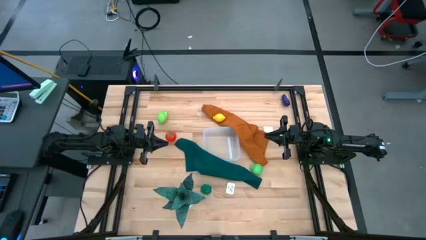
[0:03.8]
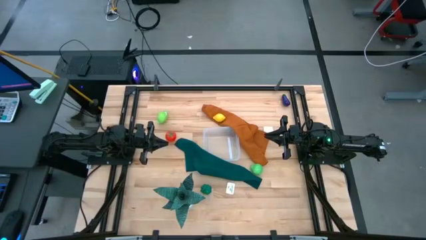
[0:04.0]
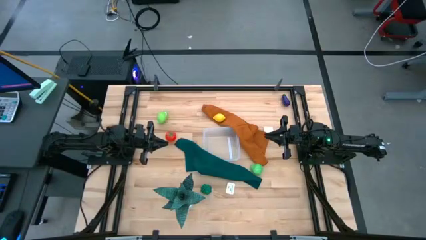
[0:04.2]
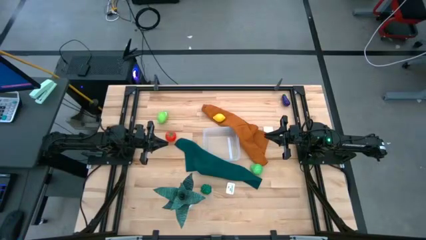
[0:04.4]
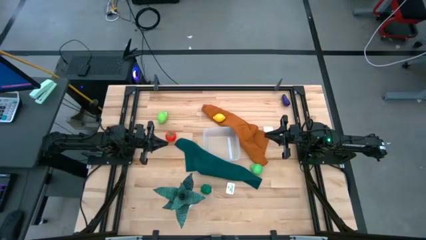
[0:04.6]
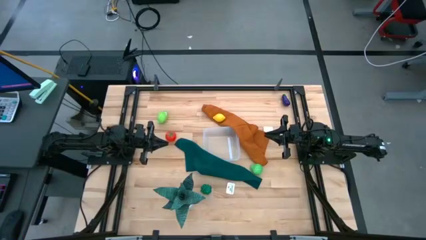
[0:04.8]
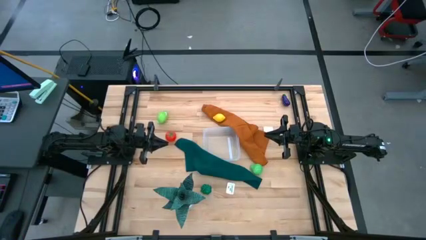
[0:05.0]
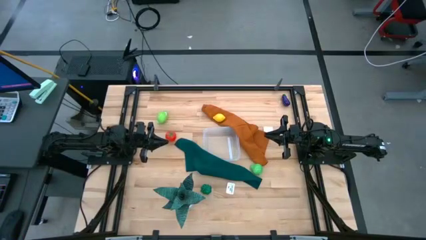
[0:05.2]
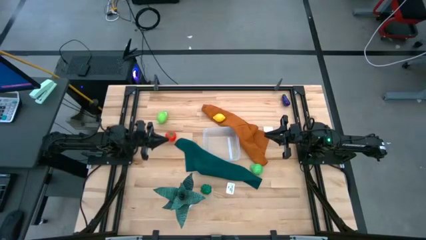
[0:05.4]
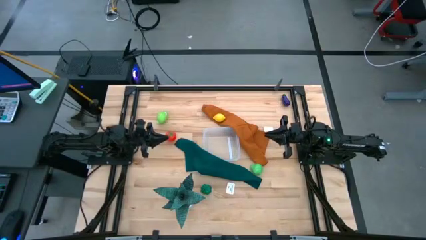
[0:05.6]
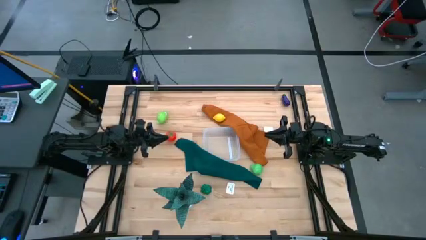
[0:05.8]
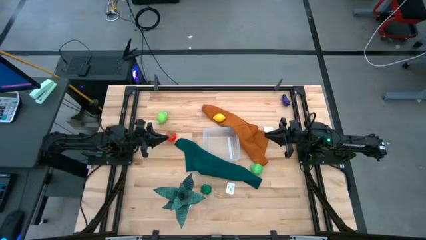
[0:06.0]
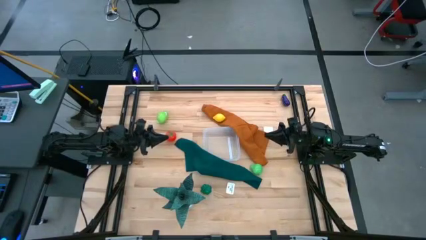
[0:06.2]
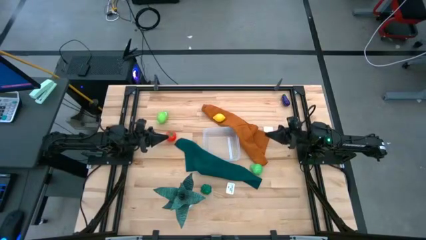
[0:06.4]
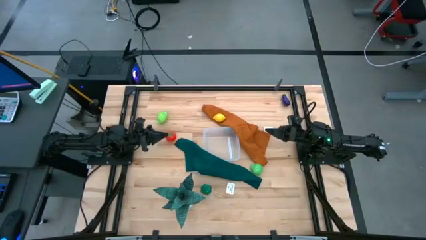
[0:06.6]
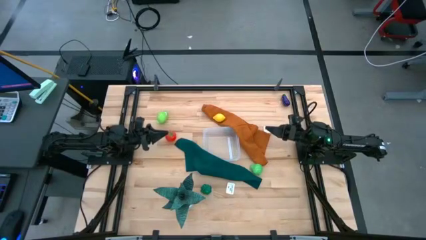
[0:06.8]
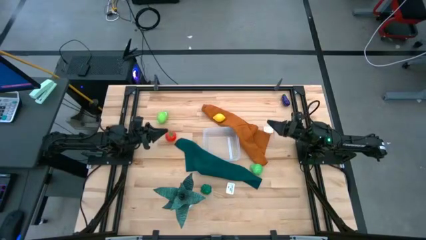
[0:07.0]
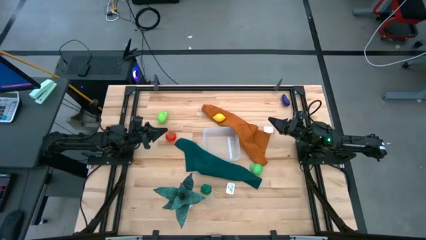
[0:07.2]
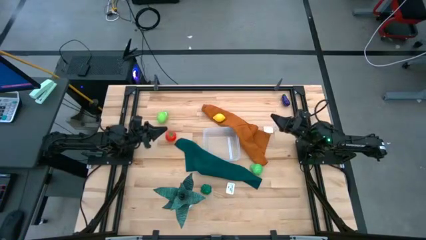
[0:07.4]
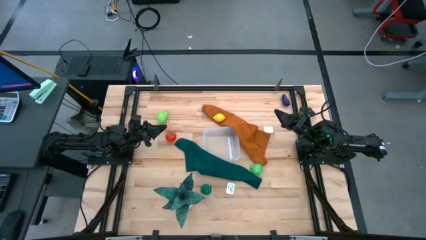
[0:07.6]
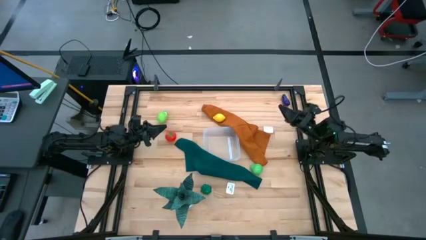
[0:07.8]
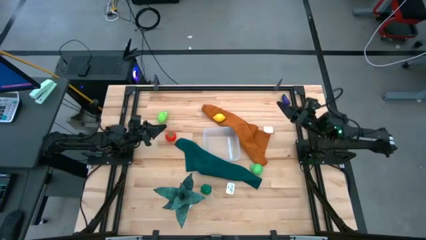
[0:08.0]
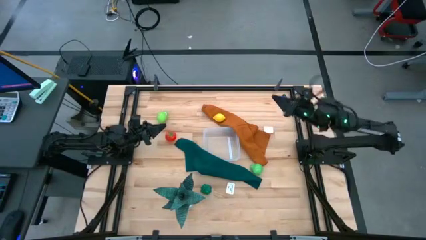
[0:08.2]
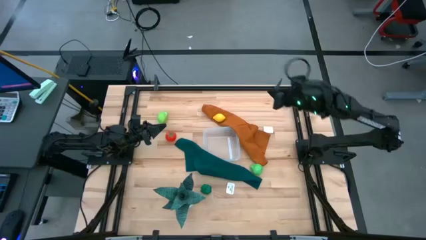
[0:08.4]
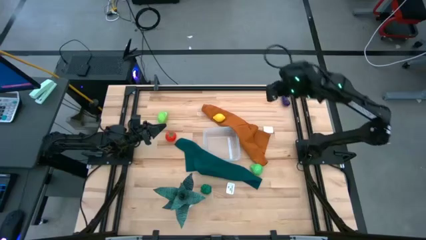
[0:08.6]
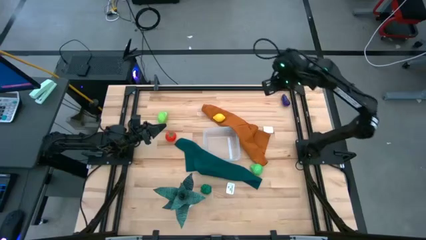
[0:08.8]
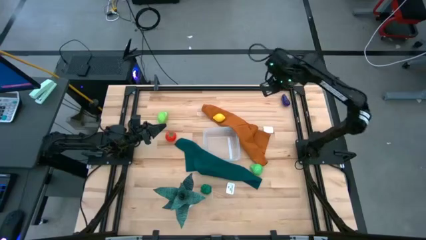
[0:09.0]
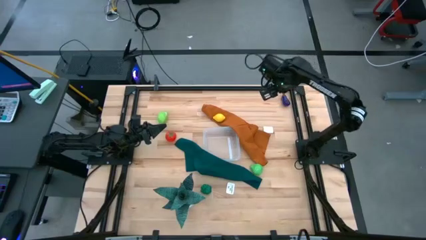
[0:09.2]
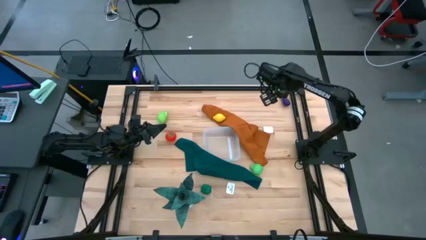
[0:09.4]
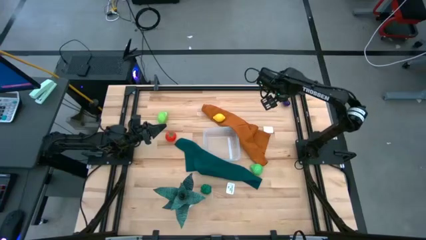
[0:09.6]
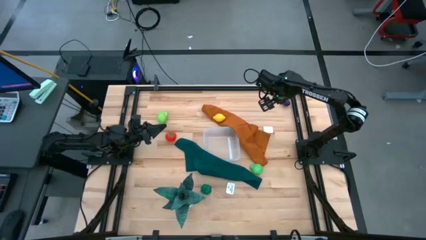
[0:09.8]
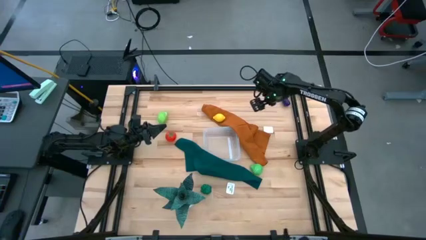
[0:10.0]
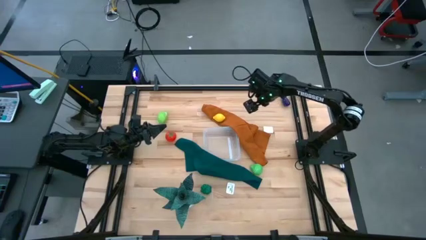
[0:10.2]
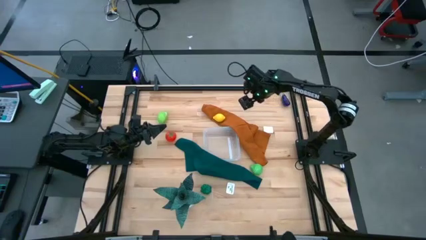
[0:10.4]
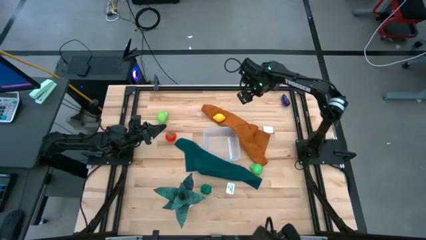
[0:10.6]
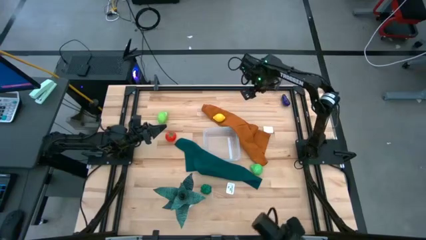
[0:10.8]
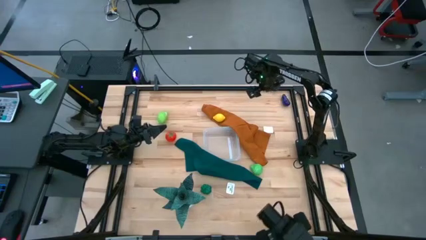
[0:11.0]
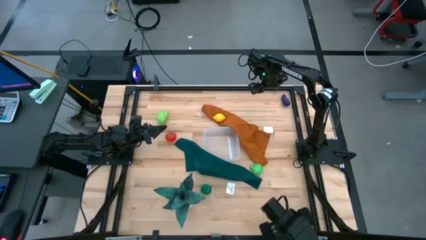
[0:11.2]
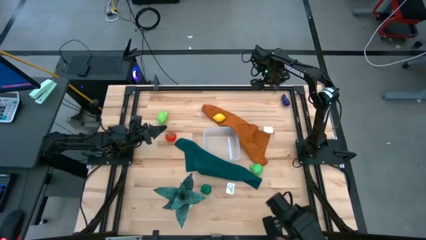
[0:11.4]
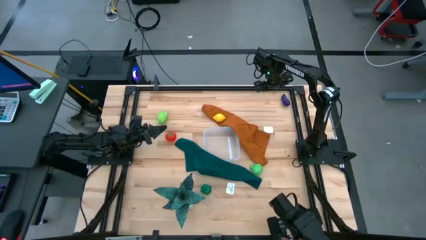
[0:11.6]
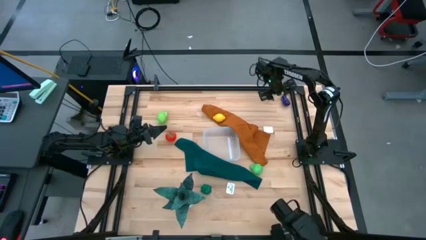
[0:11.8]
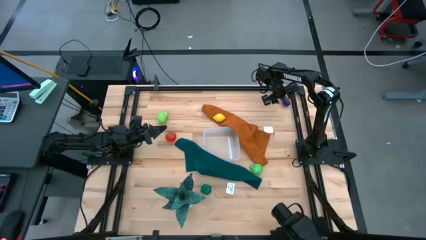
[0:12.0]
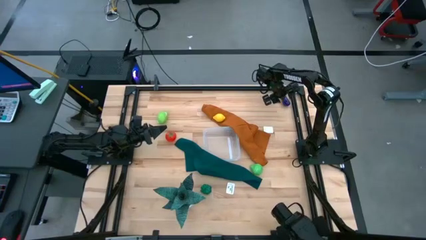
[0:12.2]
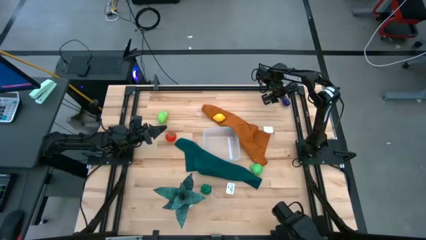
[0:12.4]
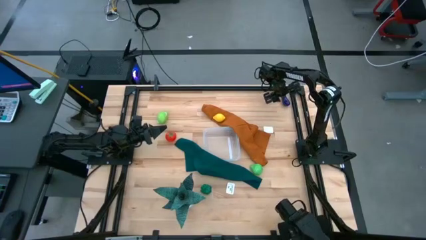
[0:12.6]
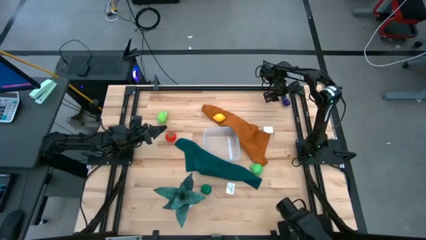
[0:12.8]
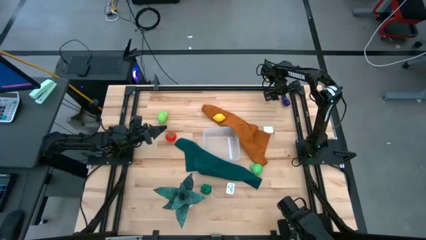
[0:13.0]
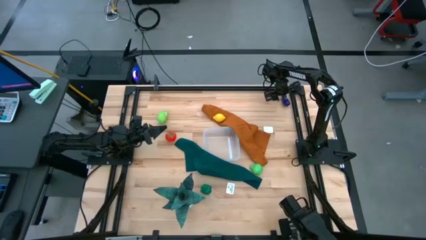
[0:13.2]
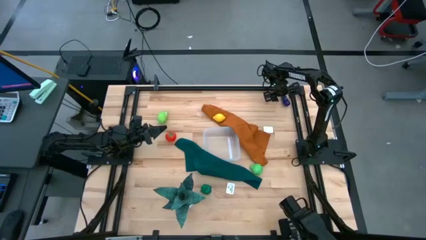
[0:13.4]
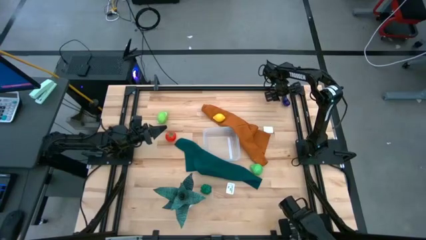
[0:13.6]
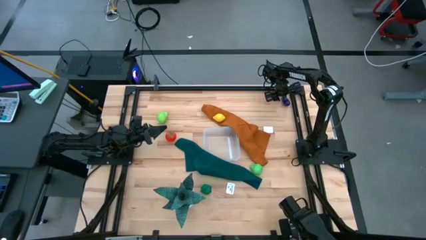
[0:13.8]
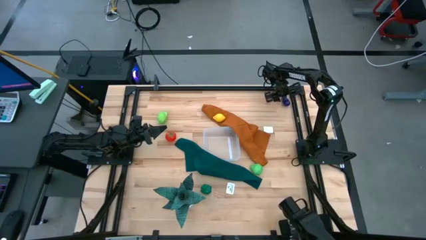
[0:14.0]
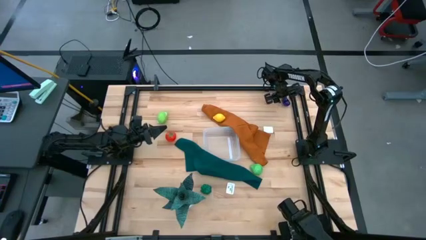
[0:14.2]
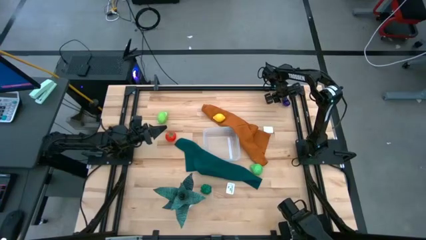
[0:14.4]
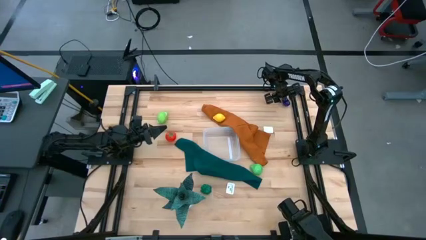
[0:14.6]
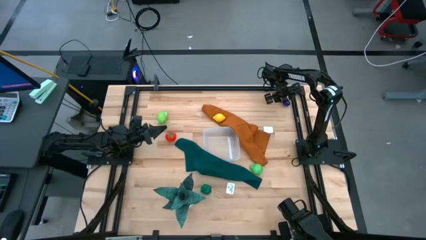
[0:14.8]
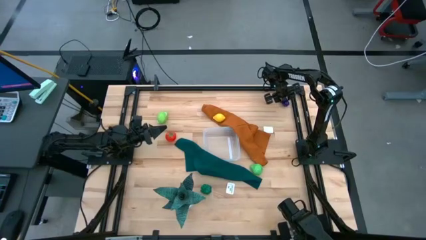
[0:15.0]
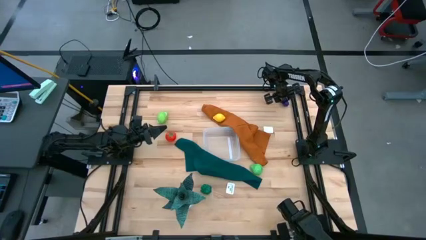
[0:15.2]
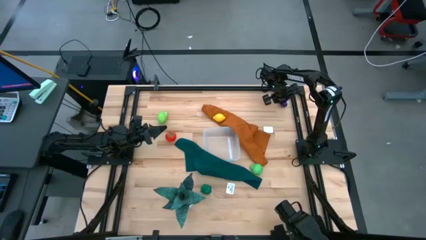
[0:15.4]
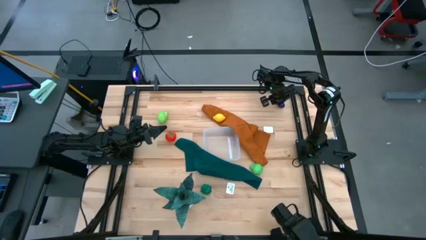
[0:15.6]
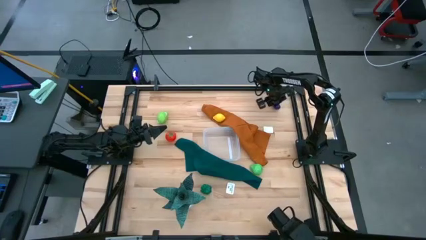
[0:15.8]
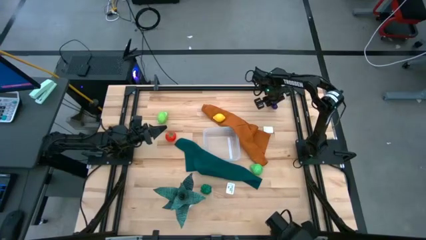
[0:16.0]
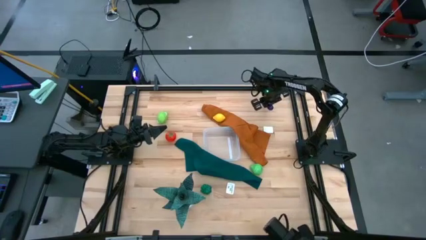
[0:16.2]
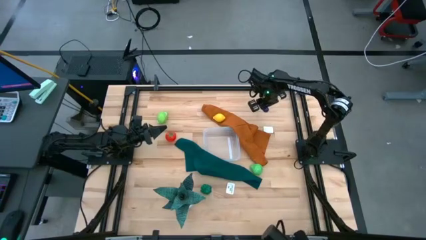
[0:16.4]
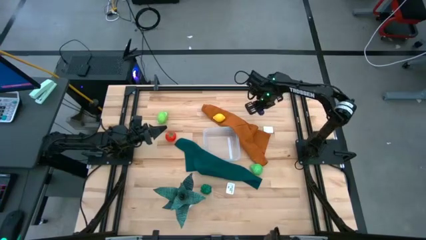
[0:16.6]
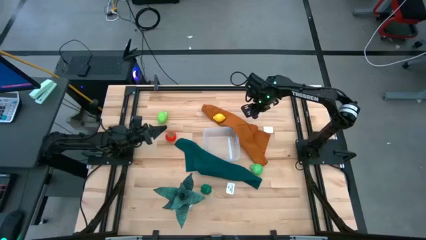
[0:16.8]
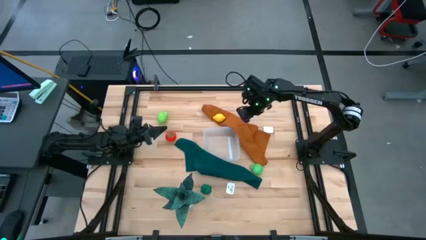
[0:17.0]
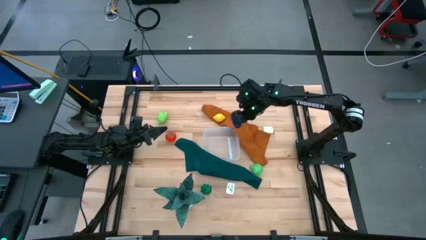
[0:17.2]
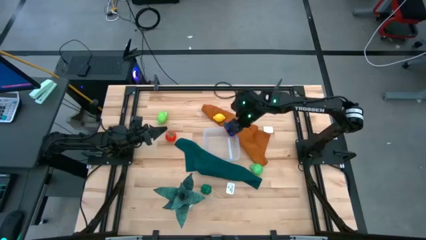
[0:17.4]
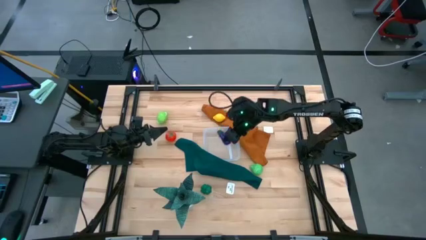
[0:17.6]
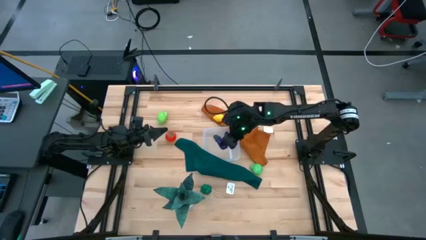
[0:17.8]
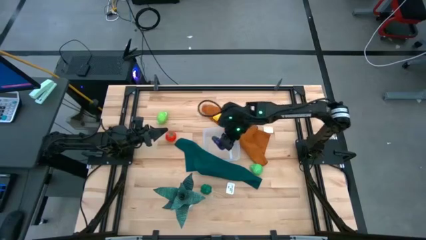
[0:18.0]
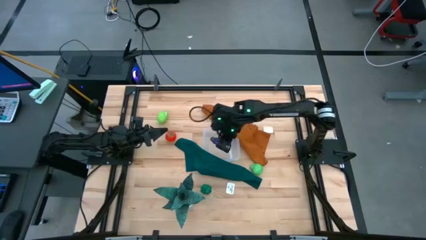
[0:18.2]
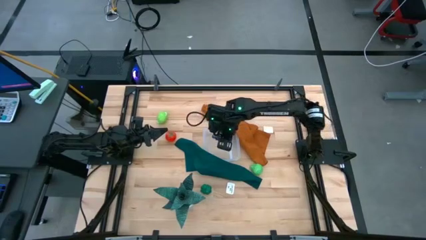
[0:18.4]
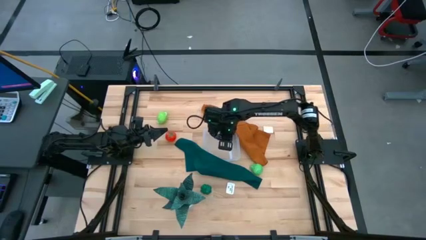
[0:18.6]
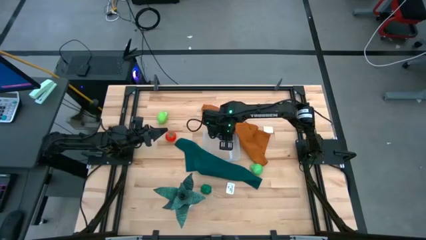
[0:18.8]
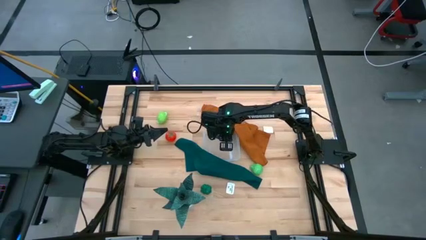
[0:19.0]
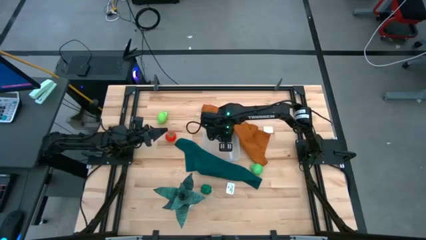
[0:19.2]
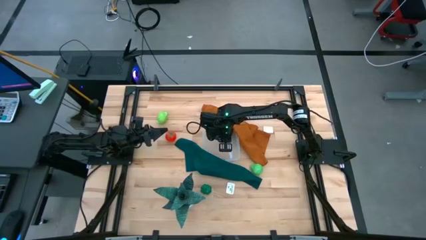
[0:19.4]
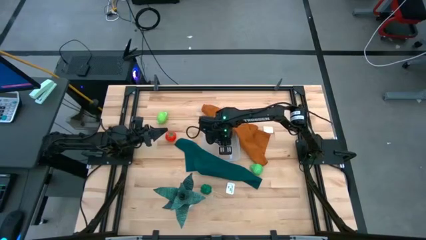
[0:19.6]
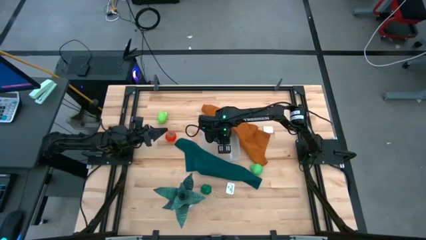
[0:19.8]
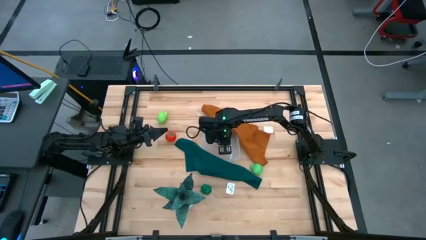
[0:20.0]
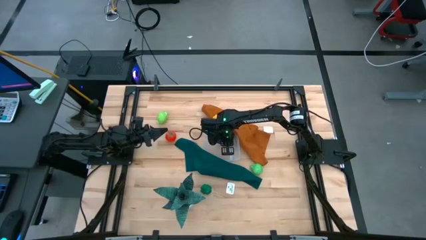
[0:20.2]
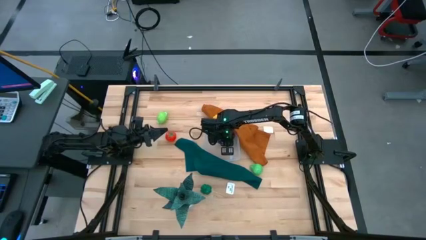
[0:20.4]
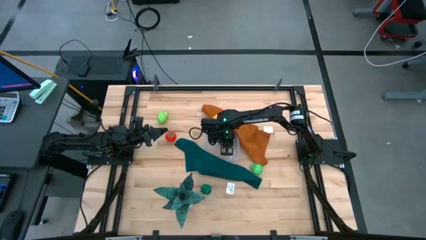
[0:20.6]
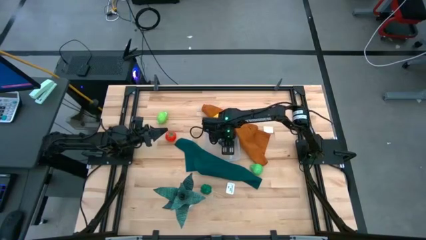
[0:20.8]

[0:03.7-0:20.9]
Task: Pick and placing Produce into tupperware
Put the purple eggplant into the transparent bin
